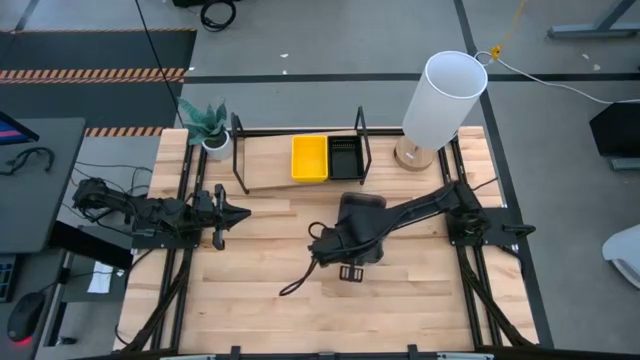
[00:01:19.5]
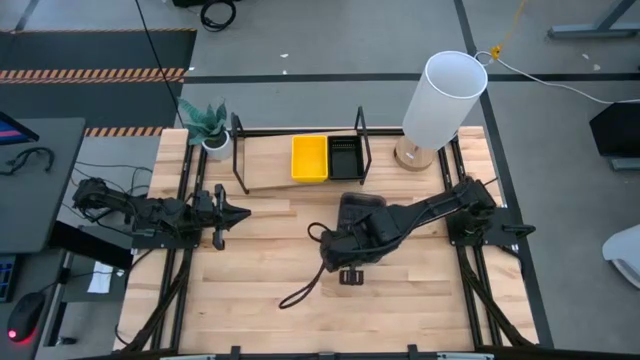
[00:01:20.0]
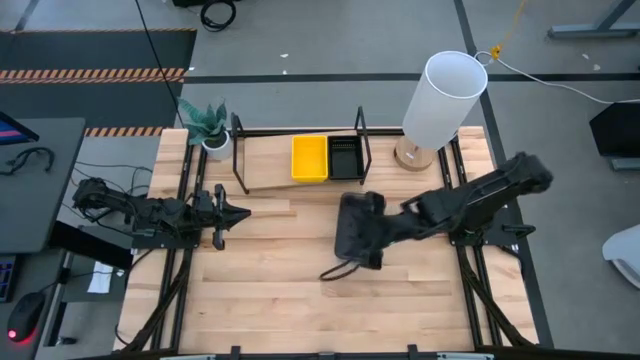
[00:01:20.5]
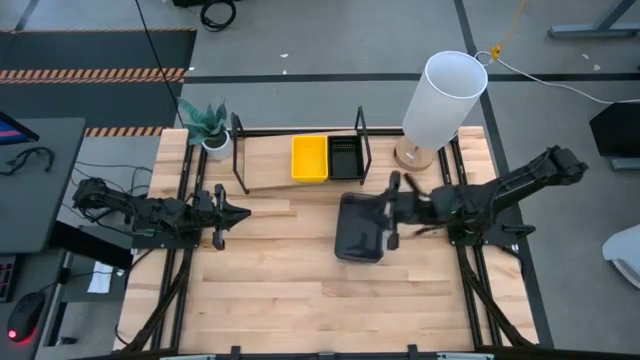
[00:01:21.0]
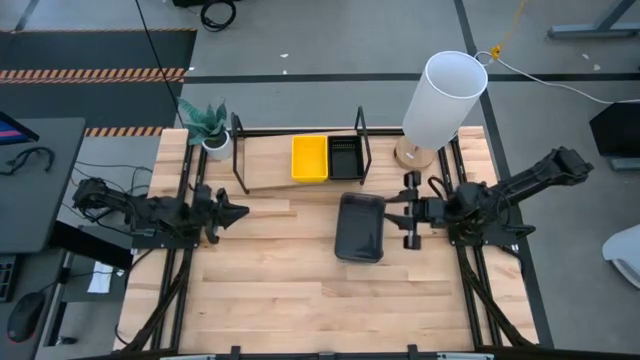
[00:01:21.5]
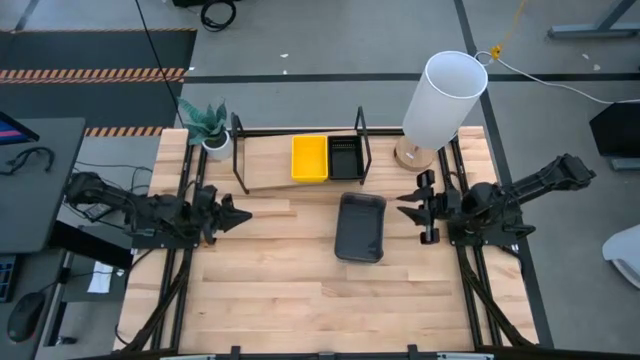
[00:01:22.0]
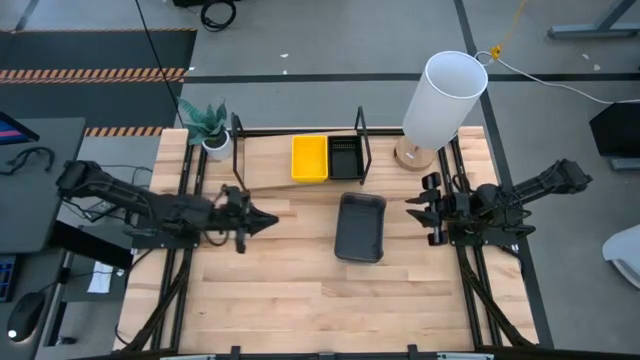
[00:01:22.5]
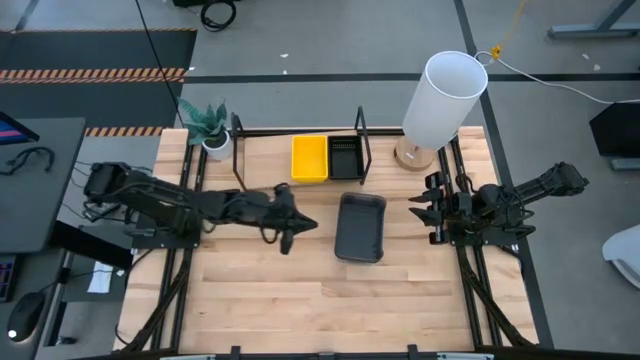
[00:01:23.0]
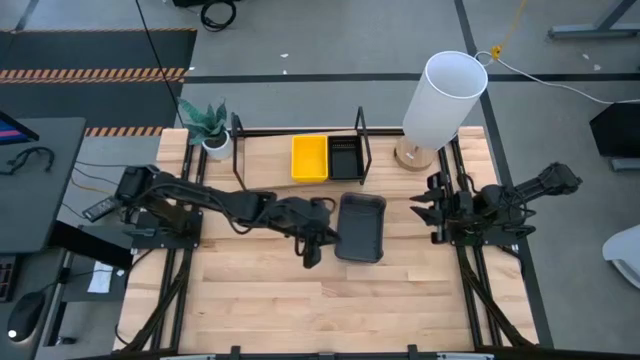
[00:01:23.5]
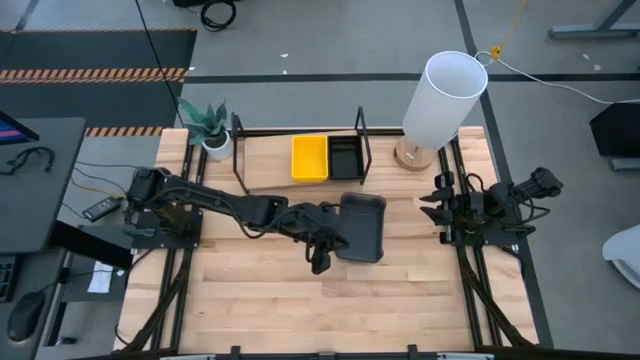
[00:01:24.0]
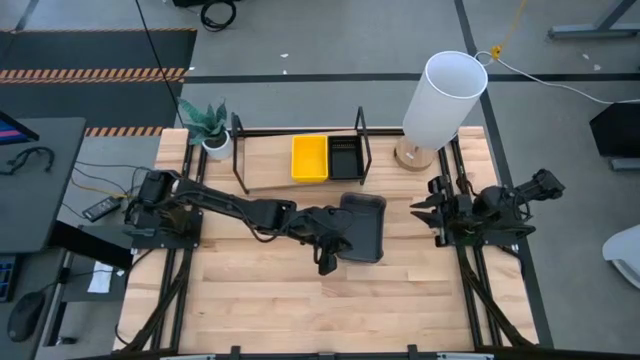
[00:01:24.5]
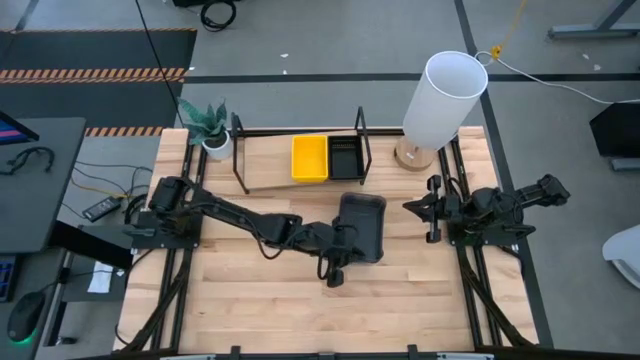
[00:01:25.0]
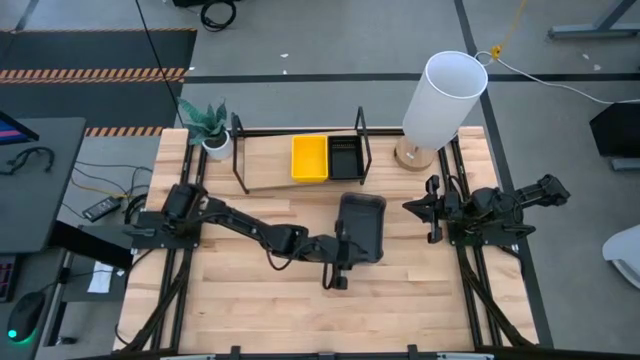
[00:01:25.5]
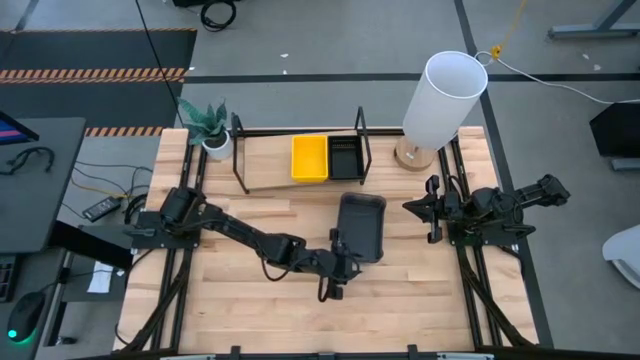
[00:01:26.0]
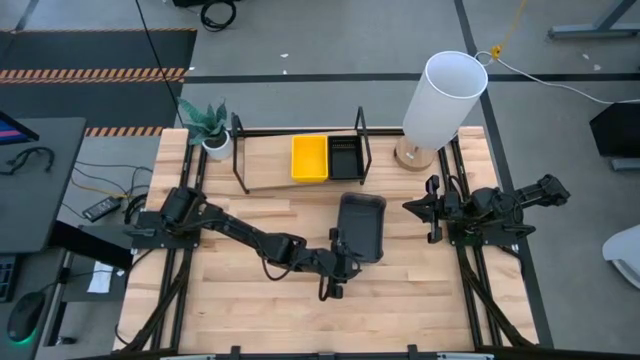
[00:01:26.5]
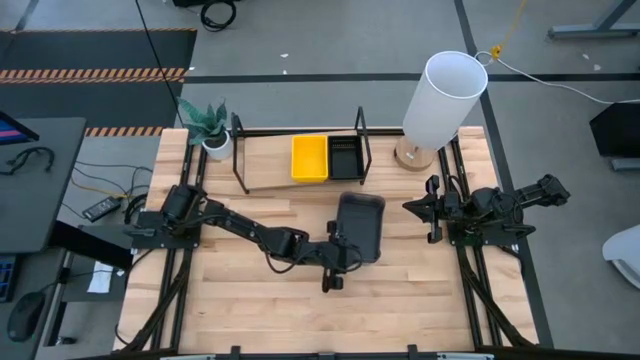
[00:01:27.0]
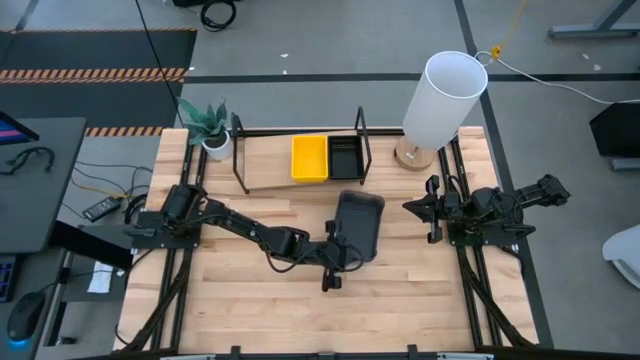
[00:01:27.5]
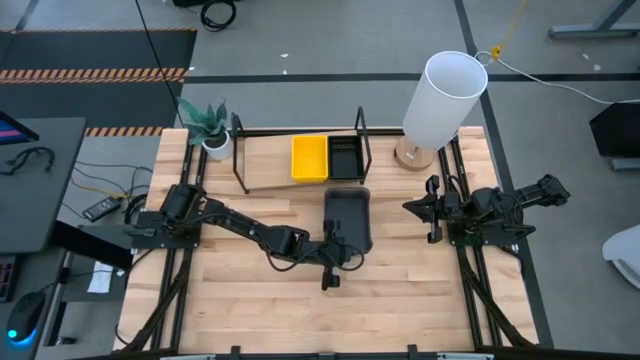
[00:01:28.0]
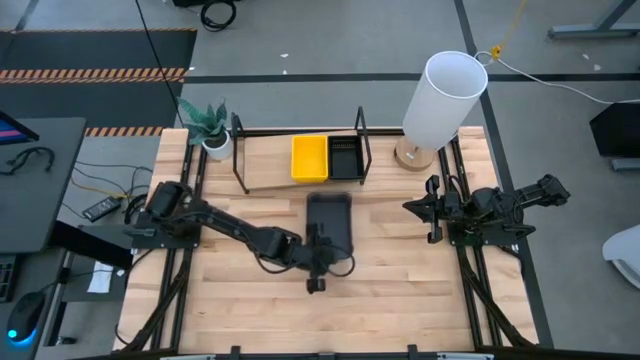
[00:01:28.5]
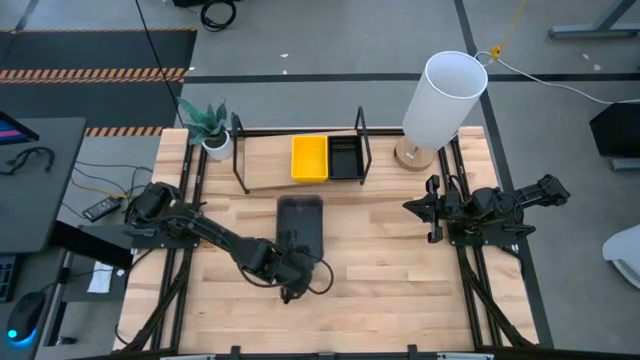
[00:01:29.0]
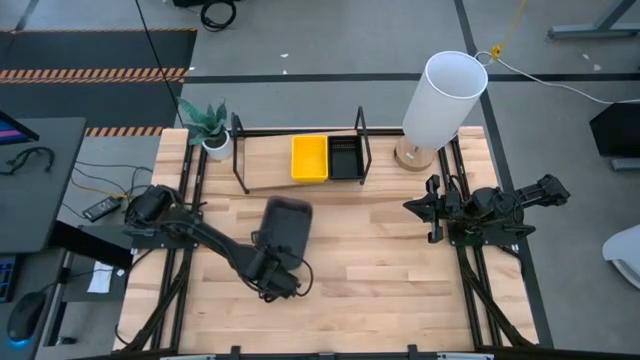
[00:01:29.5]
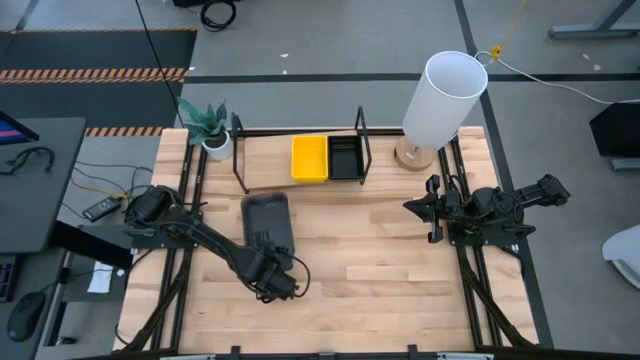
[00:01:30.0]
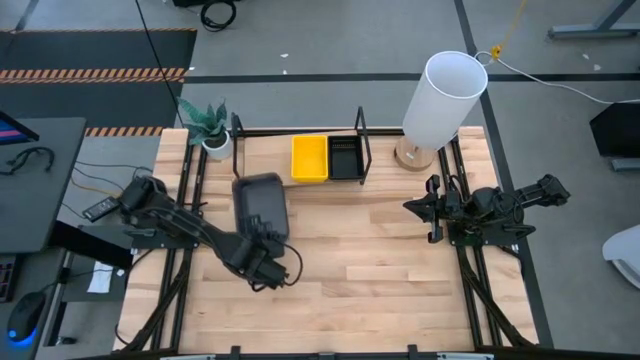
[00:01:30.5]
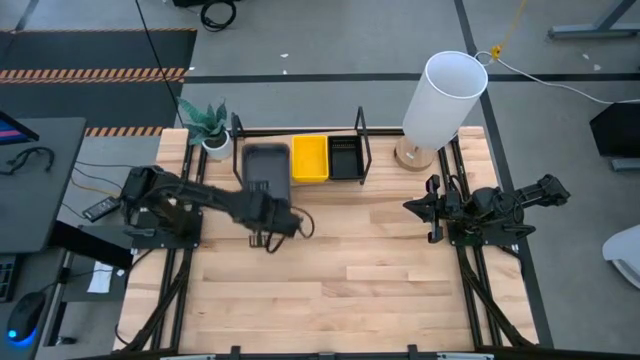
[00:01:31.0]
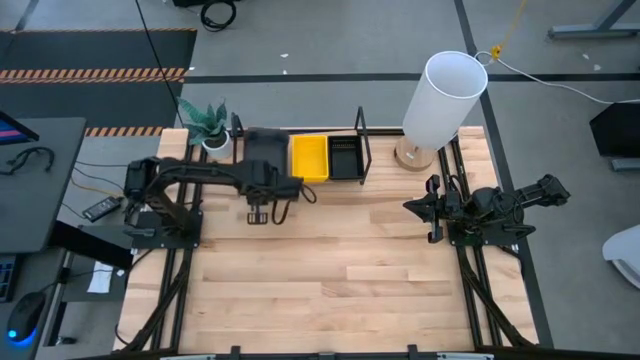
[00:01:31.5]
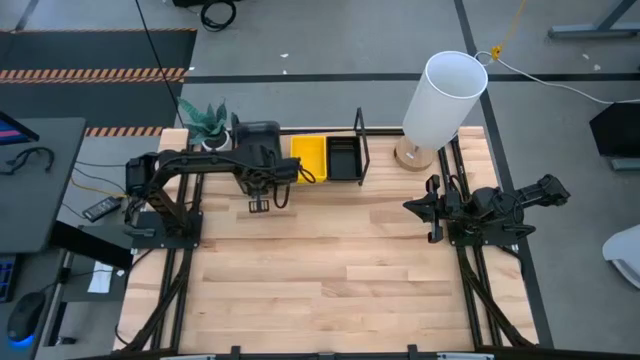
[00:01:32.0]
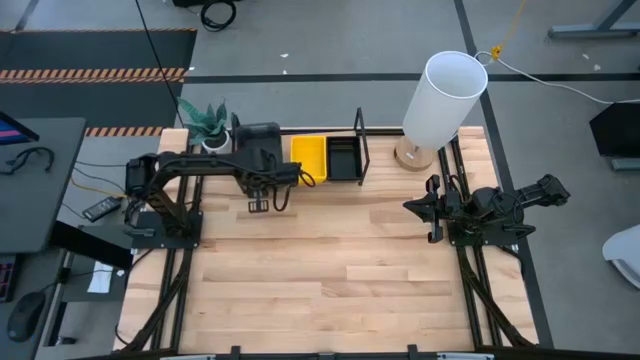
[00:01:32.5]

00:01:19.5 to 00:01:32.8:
Task: Stack baskets on shelf by color
Put the stacked black transparent bins on the shelf

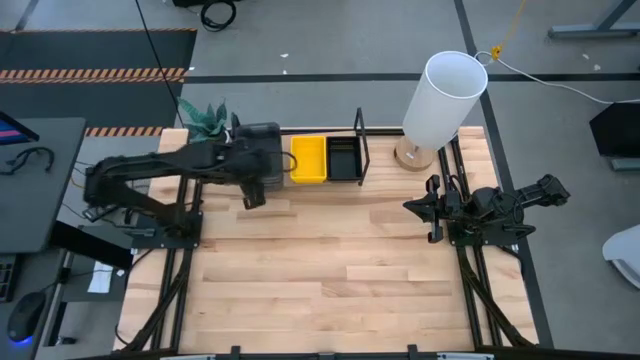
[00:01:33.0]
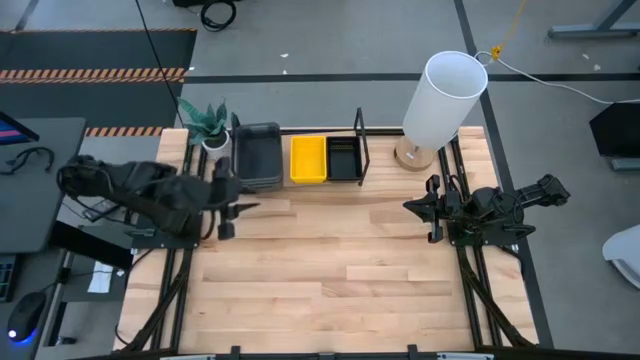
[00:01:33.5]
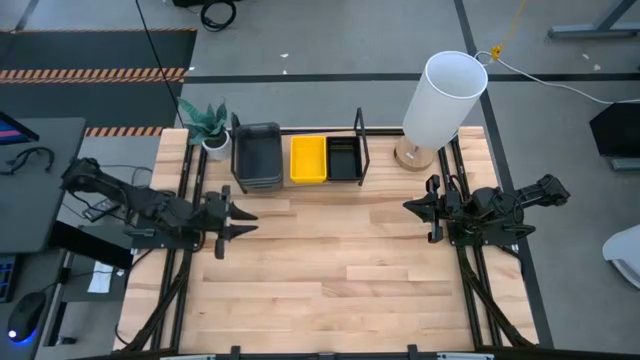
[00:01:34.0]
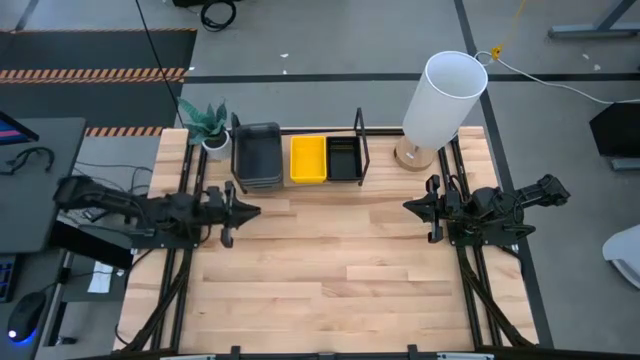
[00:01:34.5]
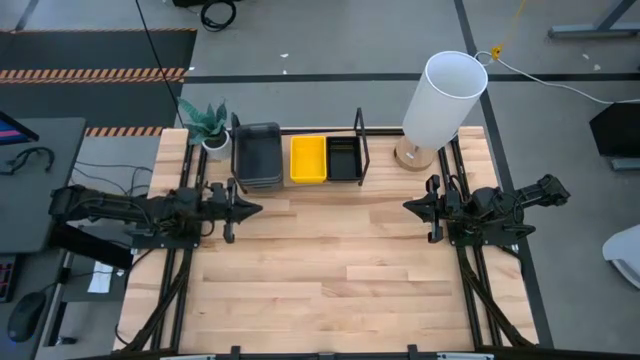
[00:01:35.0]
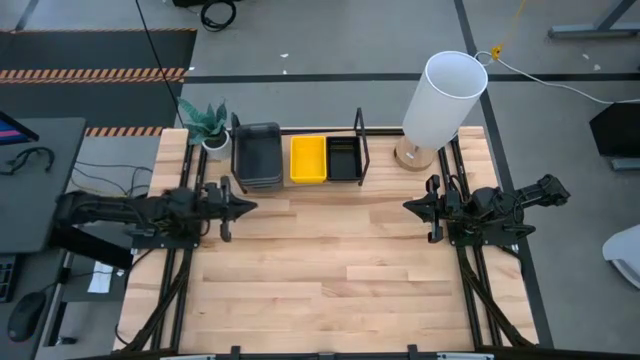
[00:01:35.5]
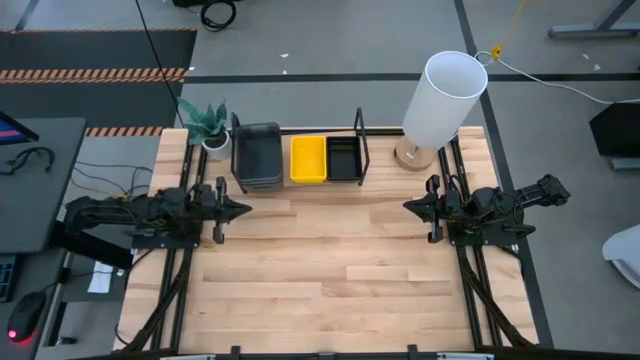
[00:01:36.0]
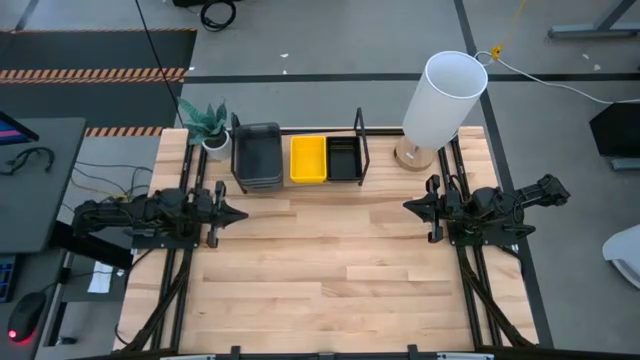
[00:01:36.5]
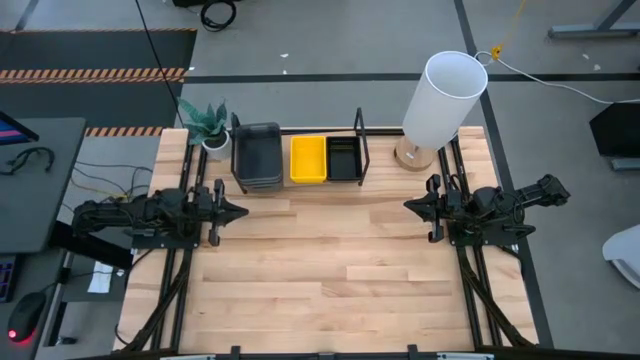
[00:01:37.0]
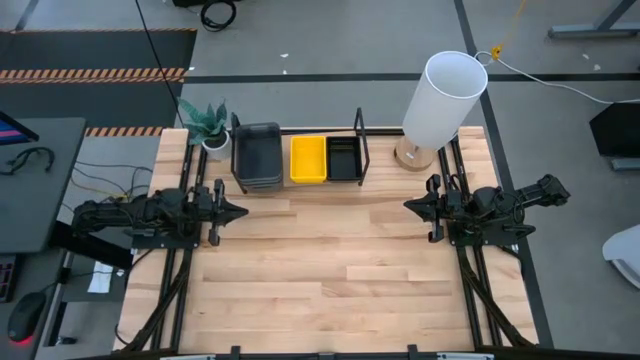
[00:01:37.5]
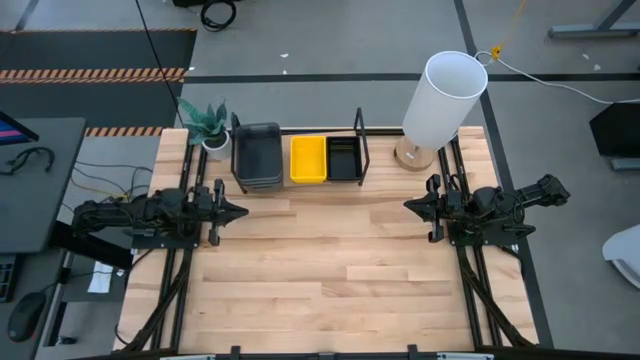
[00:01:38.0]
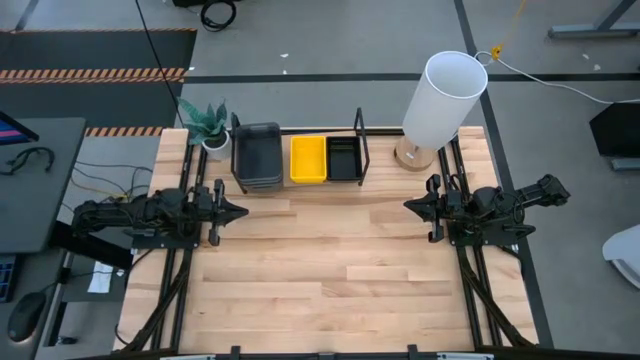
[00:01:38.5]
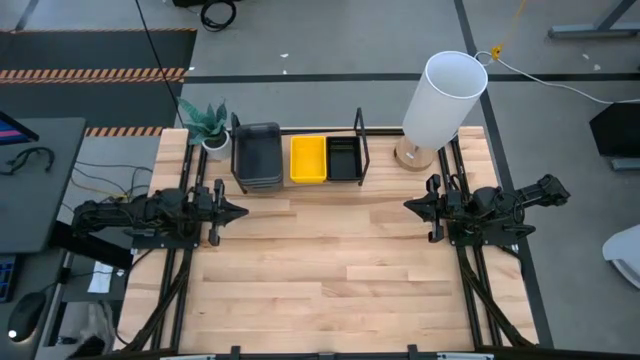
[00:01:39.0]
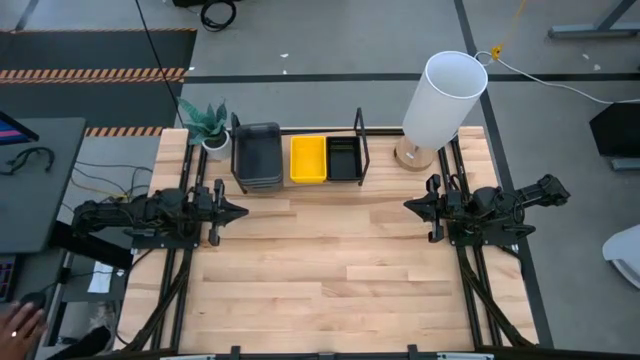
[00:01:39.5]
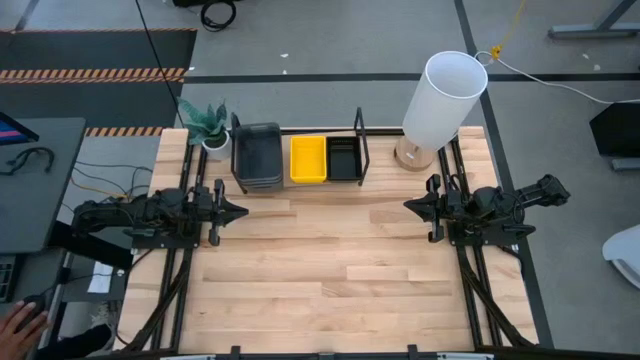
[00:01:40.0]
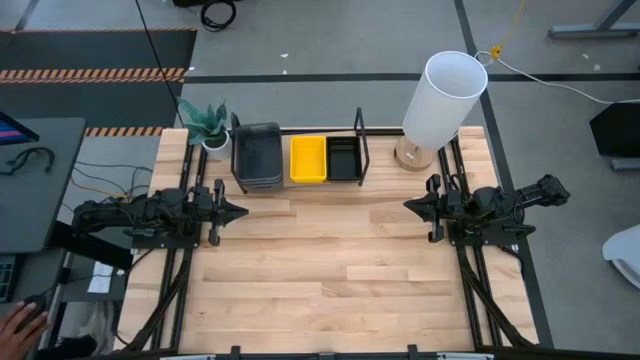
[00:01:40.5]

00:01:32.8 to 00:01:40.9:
Return to Home Position
